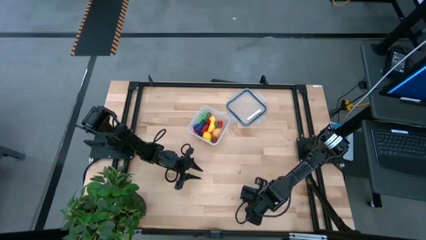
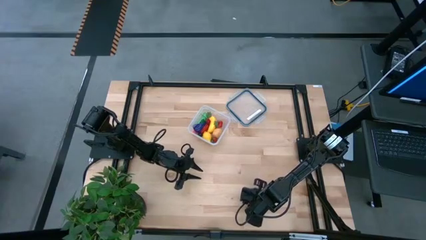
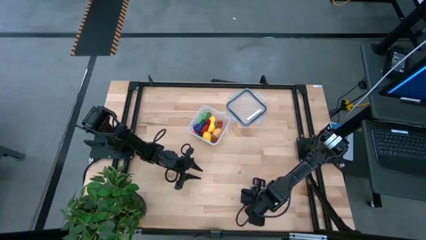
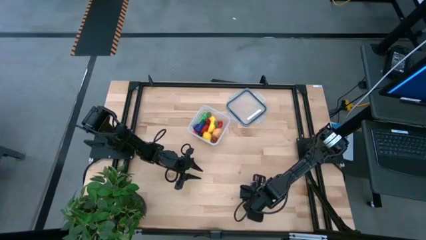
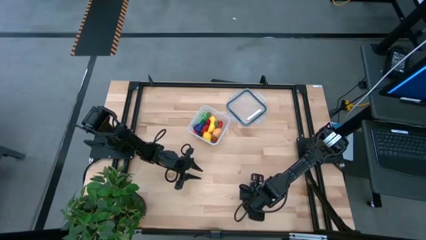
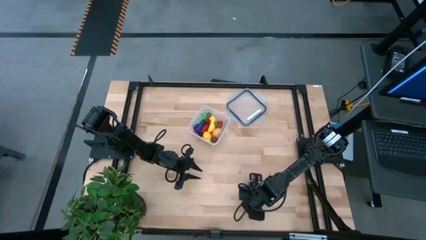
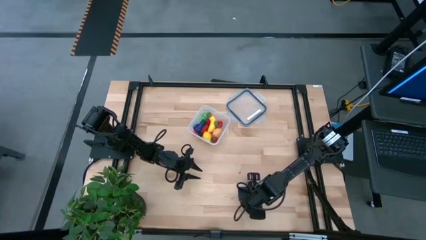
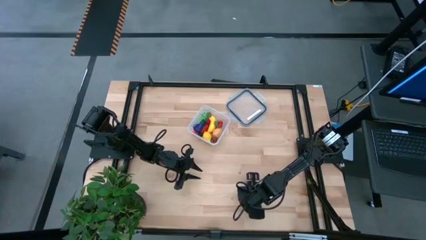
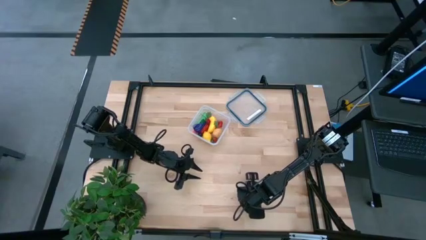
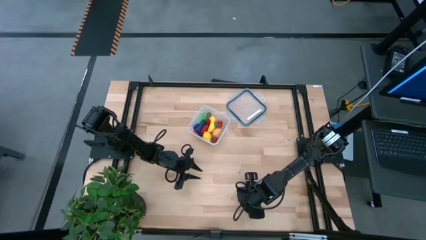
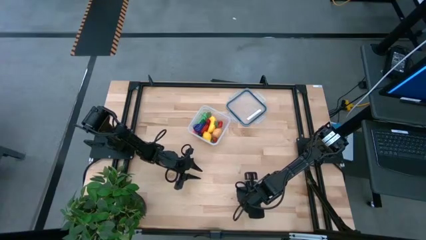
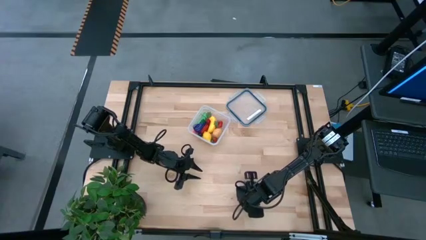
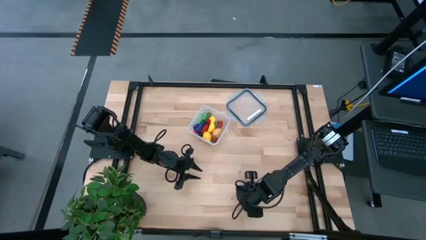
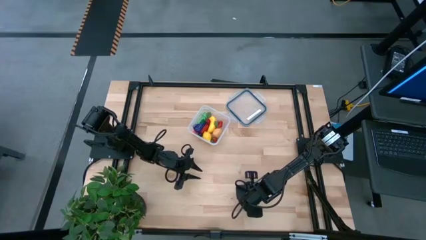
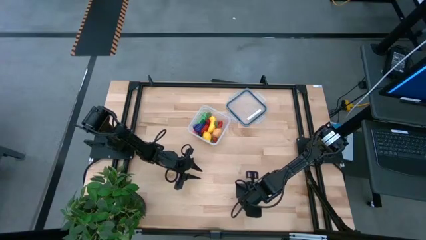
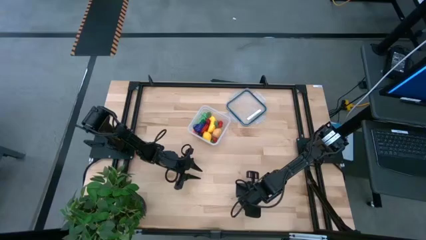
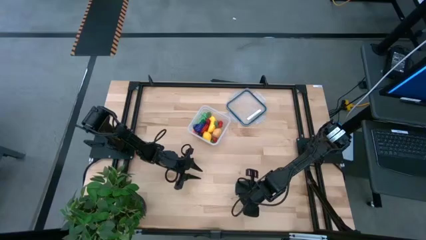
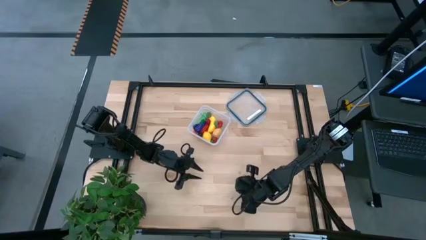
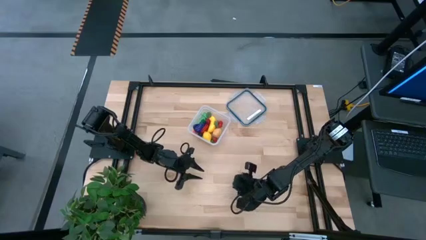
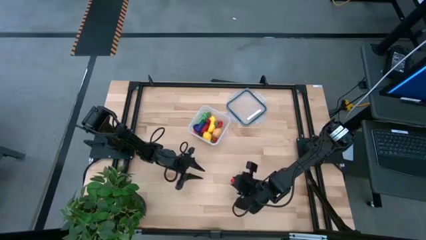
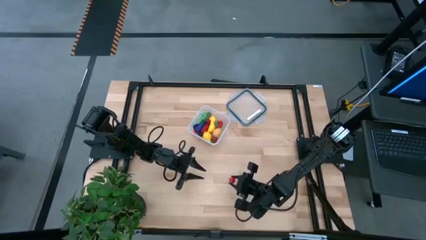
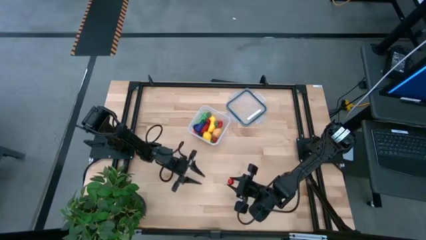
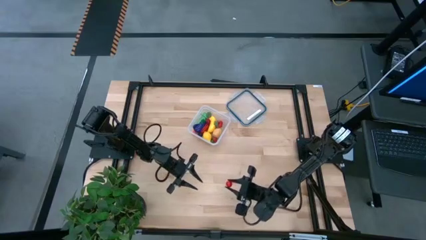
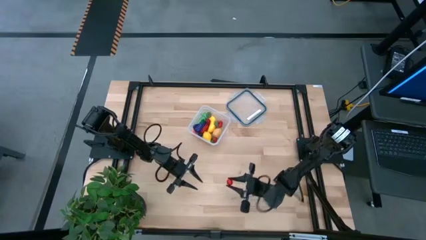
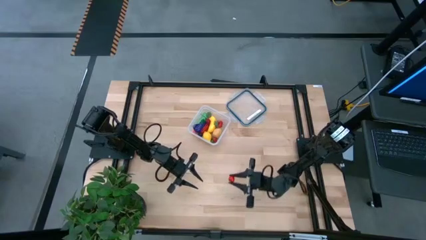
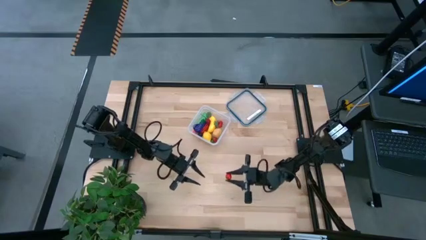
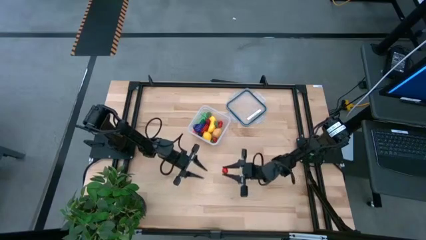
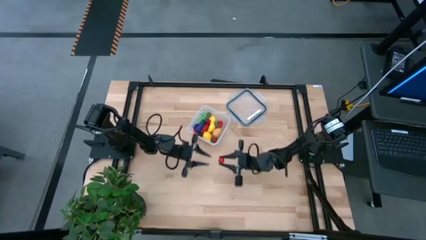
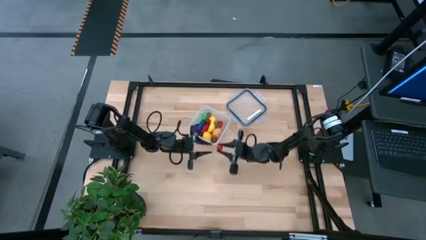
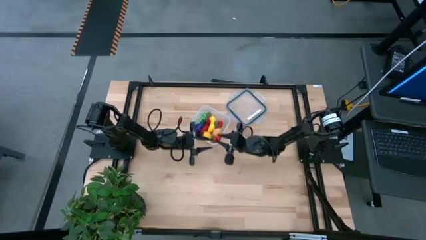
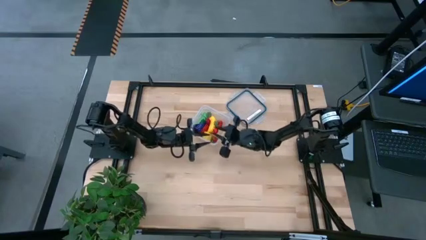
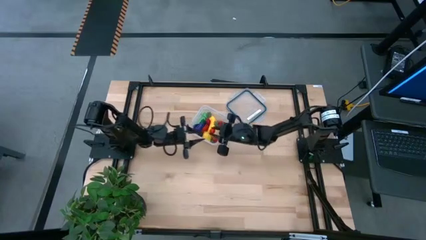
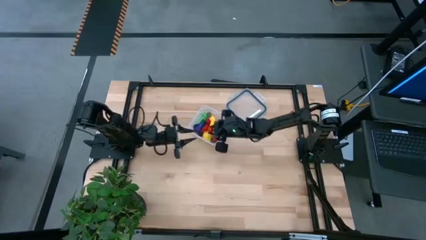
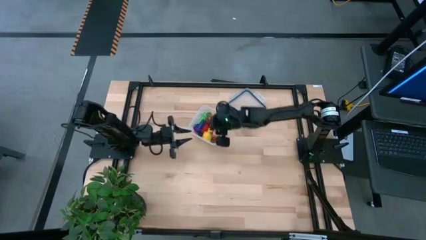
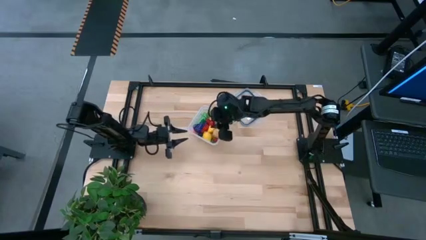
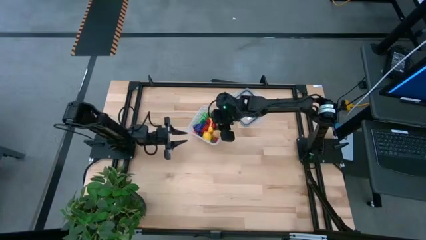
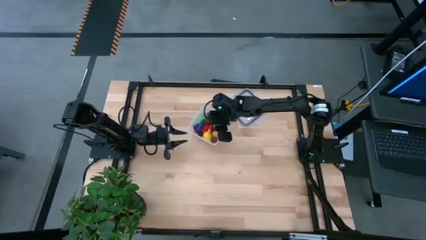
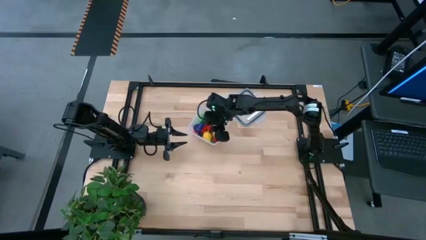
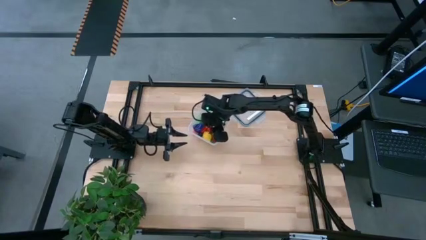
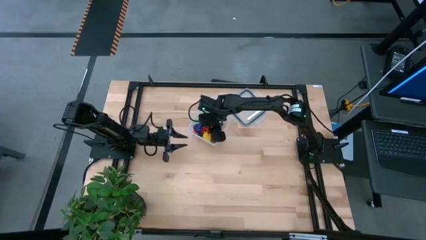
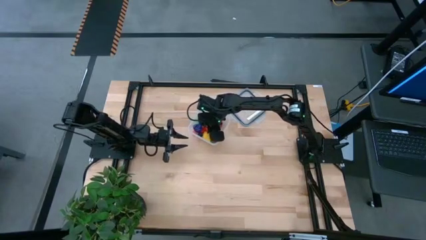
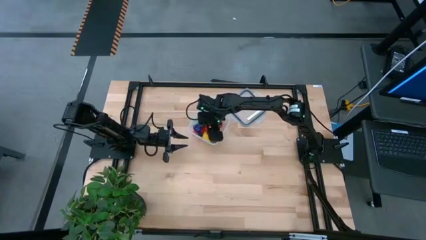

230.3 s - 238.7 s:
Task: Pick and placing Produce into tupperware
Put the red cherry into the transparent container

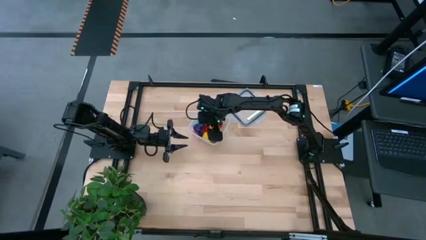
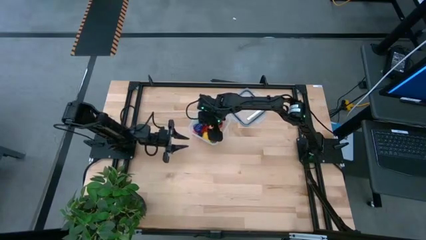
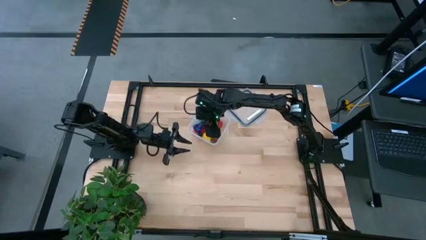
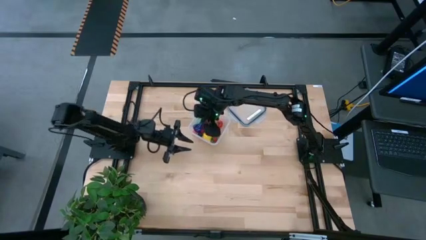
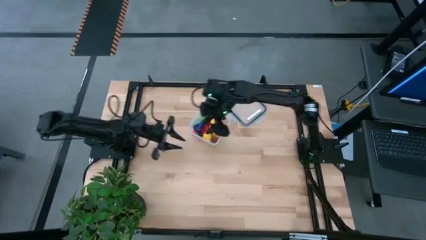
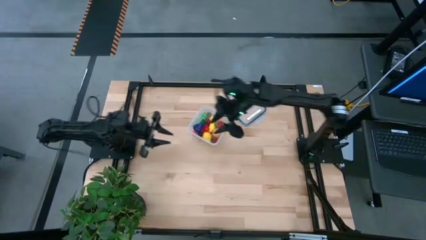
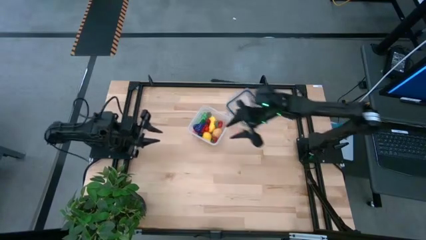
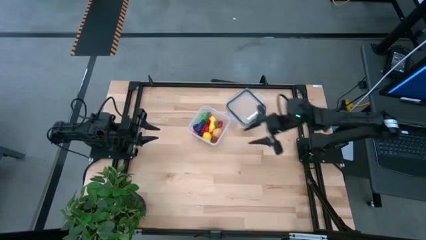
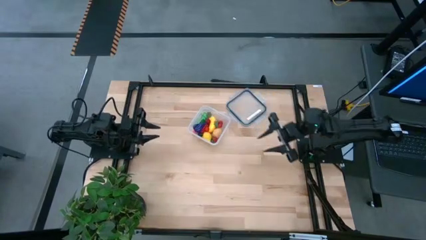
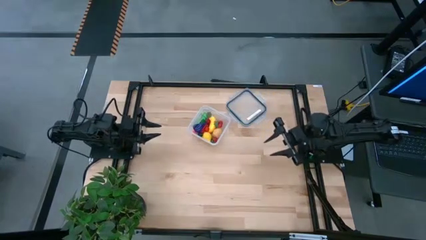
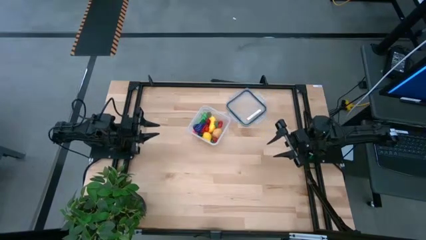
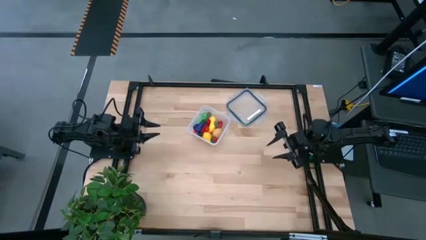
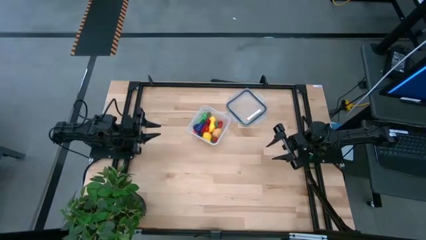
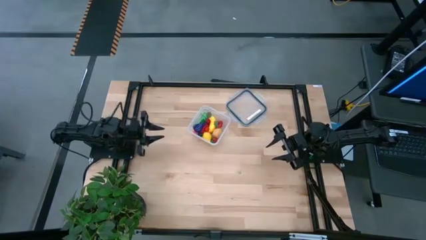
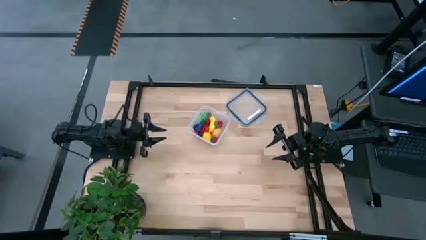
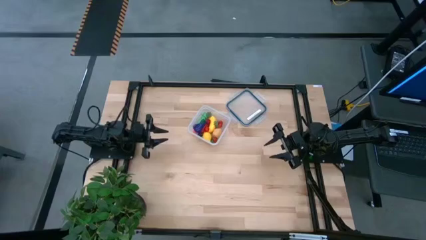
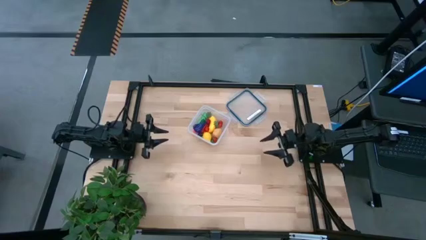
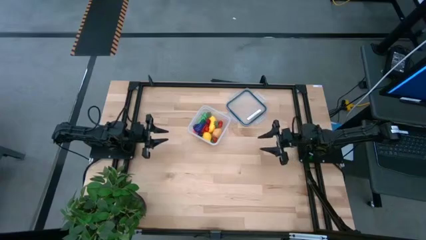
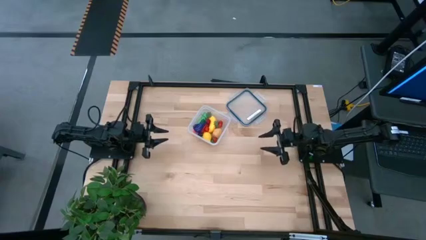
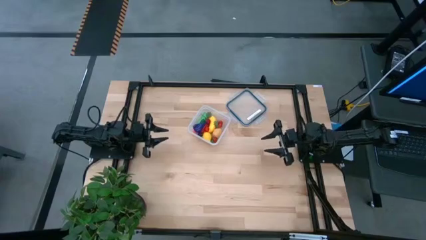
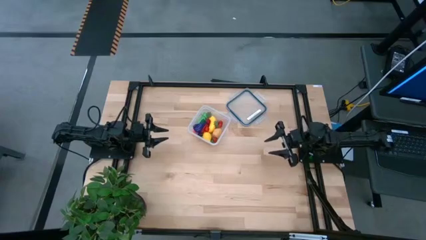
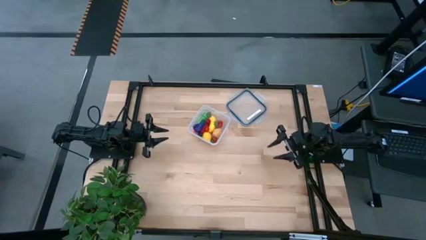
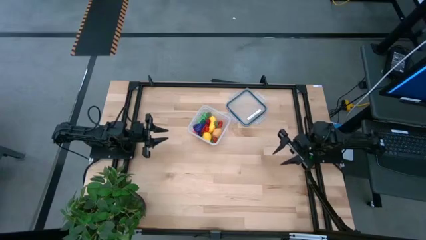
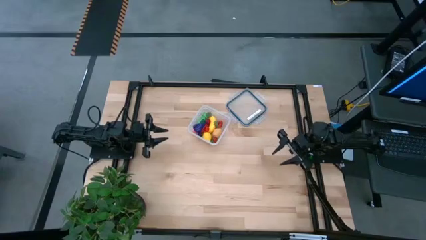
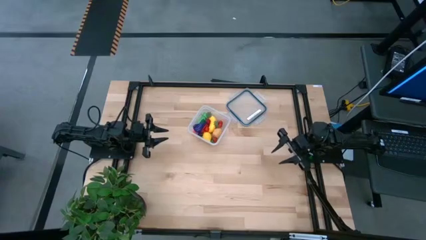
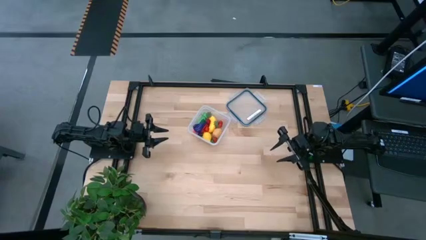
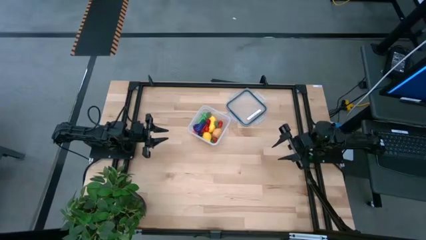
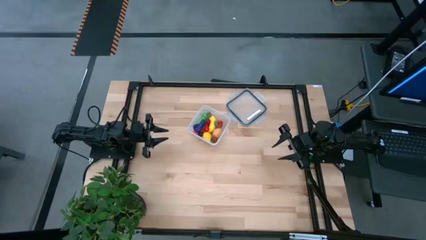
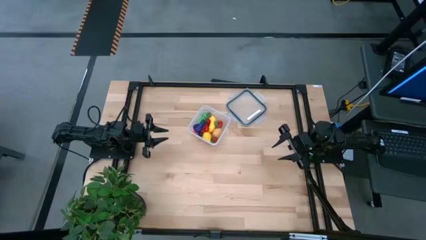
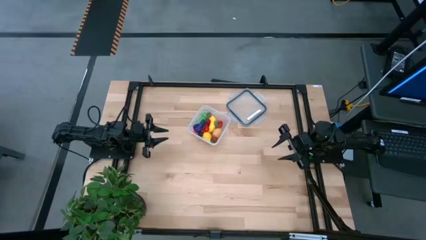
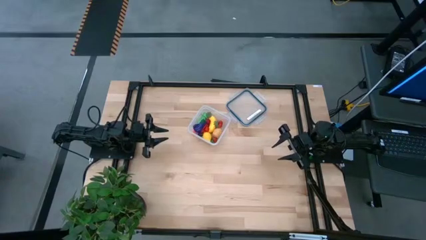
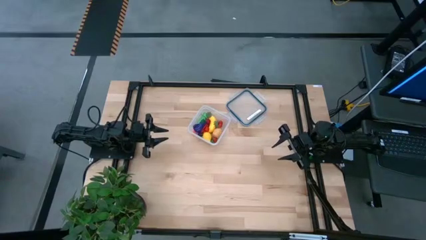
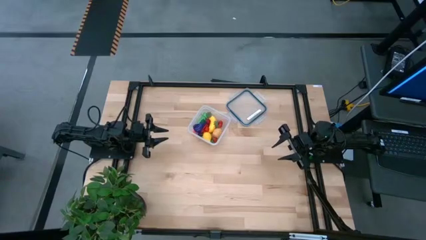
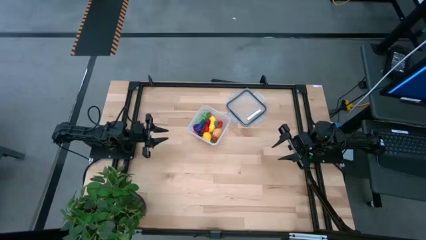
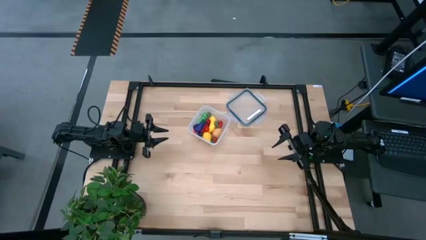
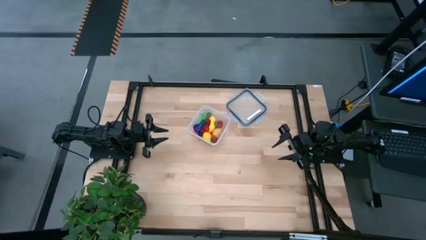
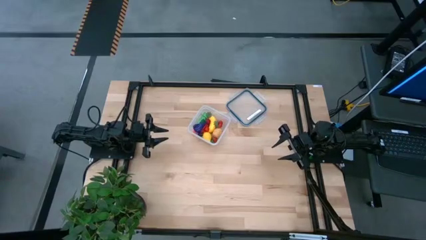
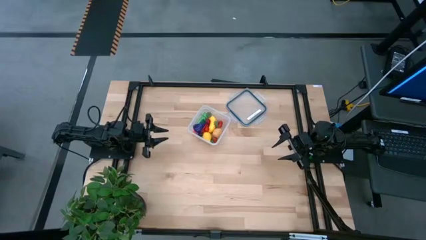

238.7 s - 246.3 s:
Return to Home Position

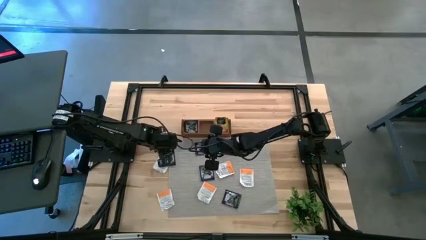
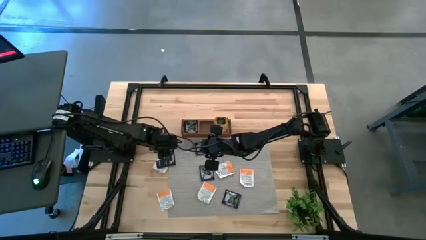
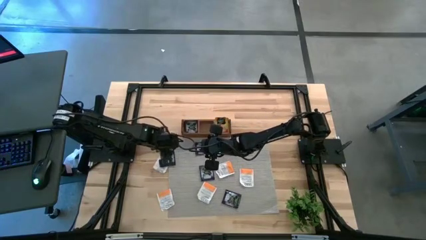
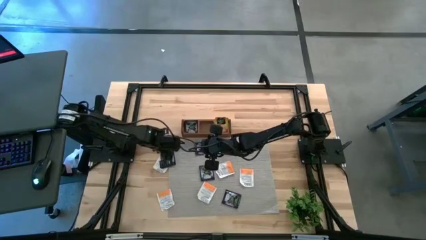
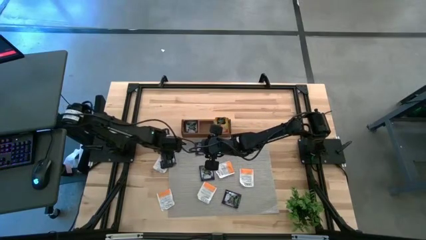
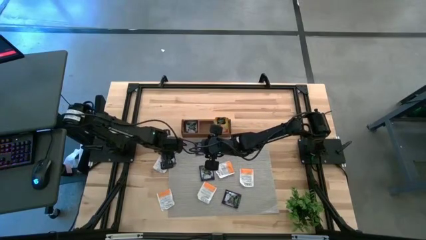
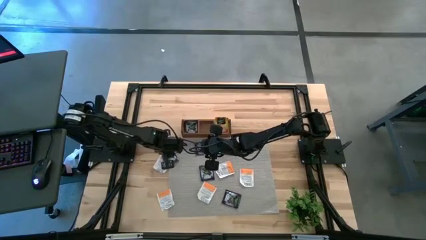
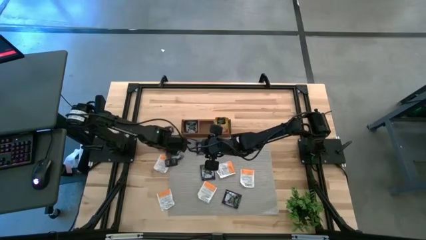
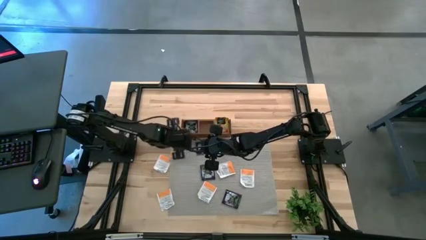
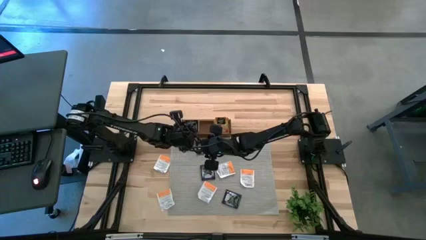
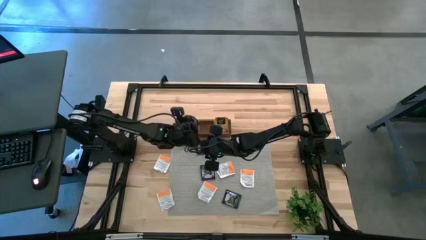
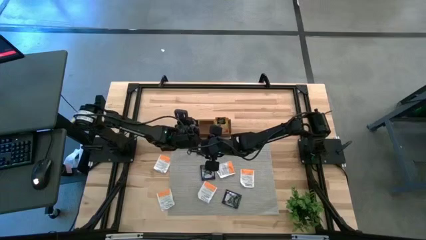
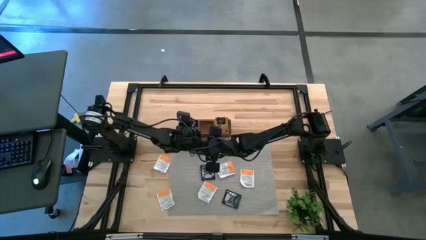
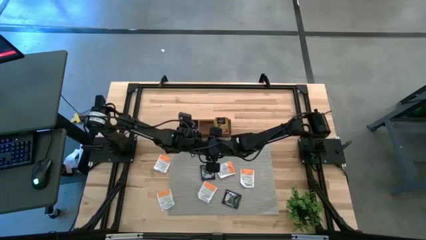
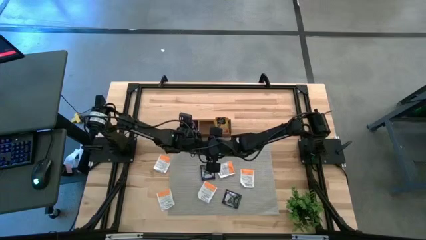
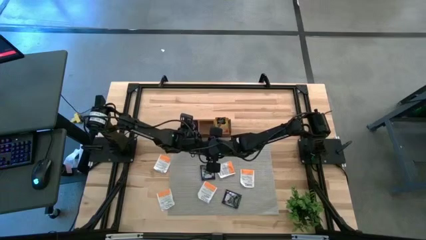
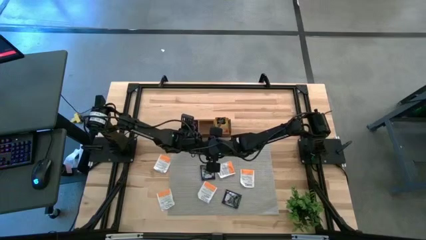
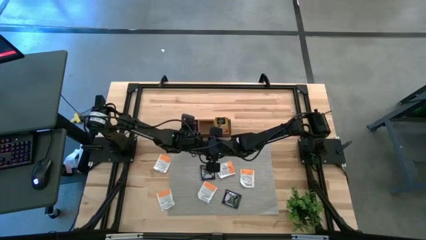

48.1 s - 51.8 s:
Task: Pick & Place Tea
Put the violet tea bag into the left section of the wooden organizer
